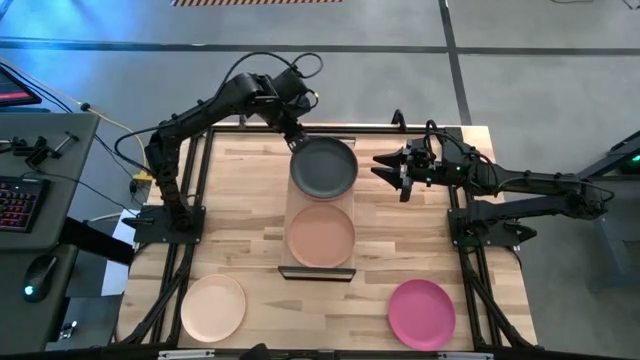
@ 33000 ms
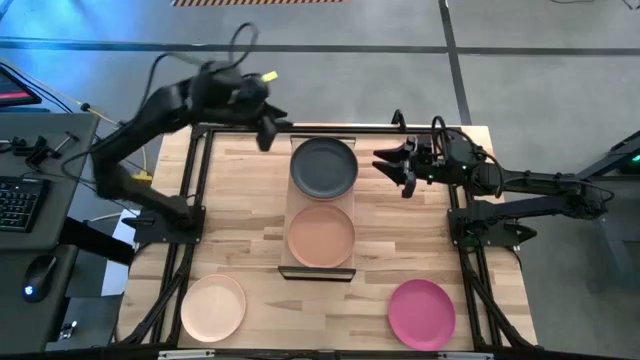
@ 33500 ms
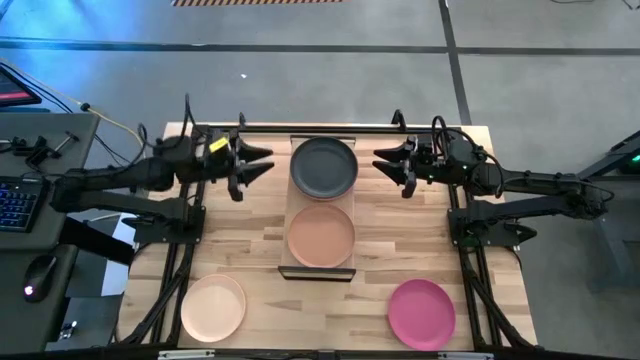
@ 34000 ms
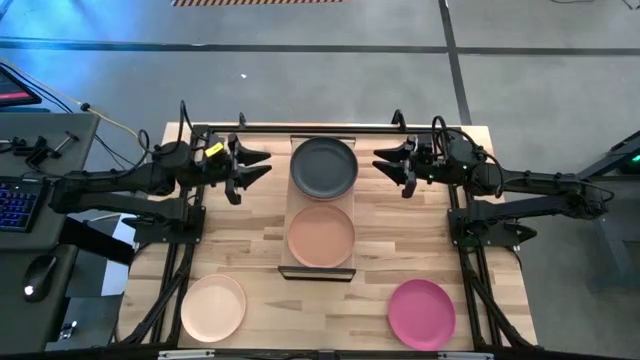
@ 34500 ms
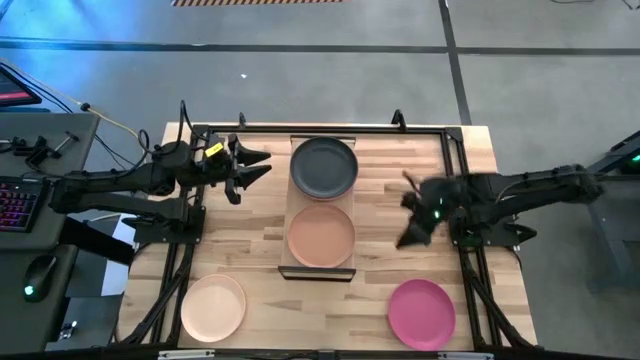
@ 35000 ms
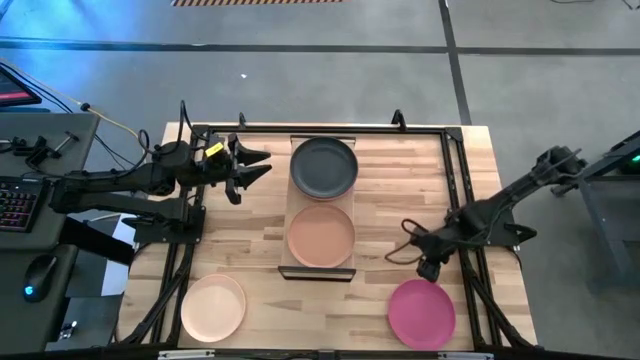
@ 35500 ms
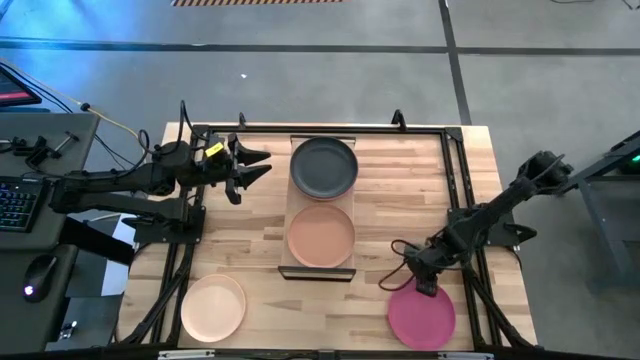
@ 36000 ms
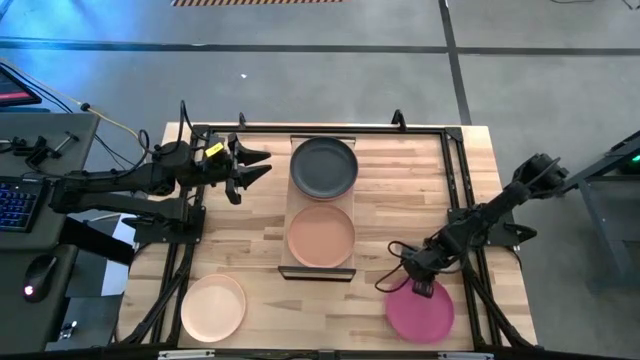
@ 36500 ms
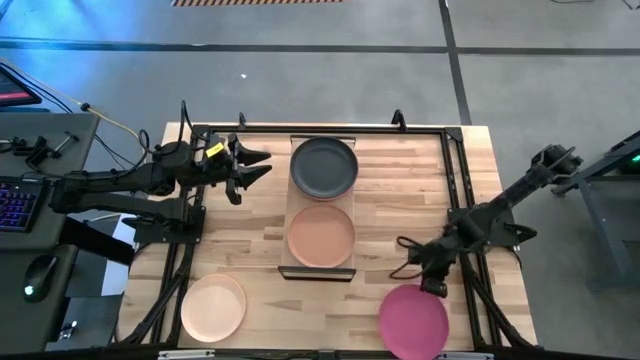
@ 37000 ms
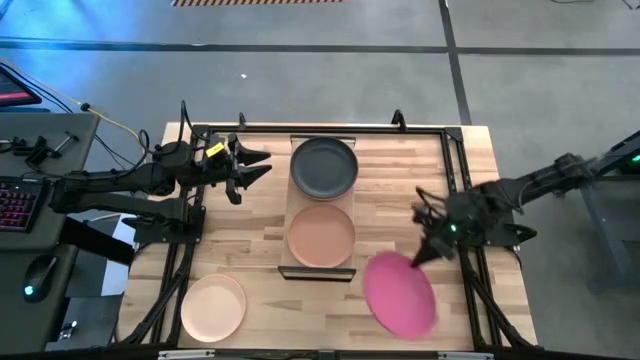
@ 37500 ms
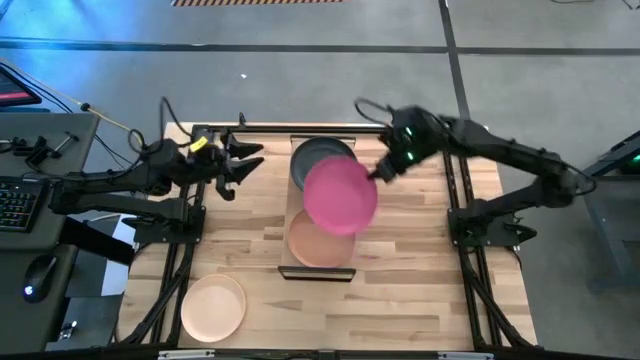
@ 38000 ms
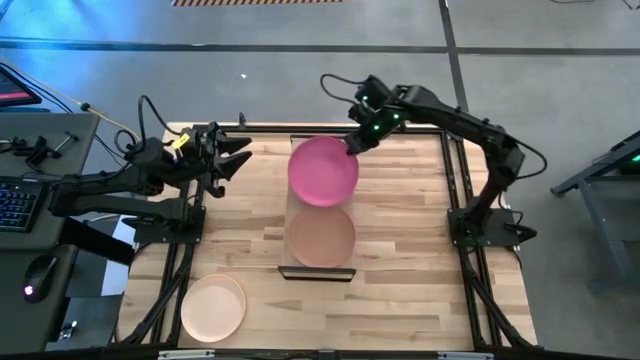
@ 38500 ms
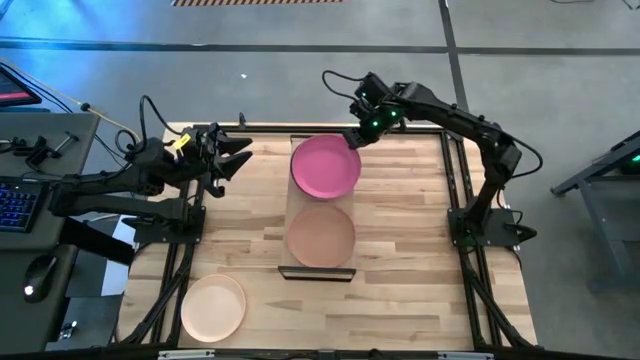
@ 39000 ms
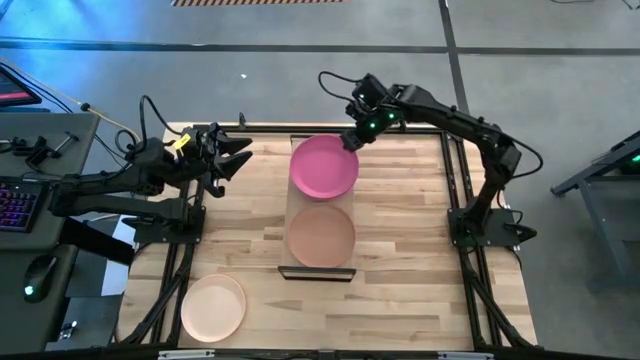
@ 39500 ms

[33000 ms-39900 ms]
Task: Place and stack plates onto a shelf
Stack the pink plate on top of the black plate on the shelf

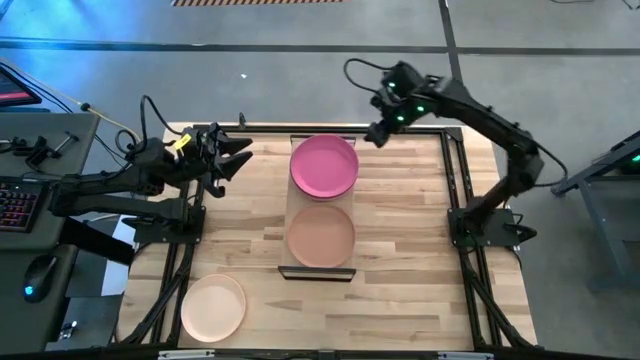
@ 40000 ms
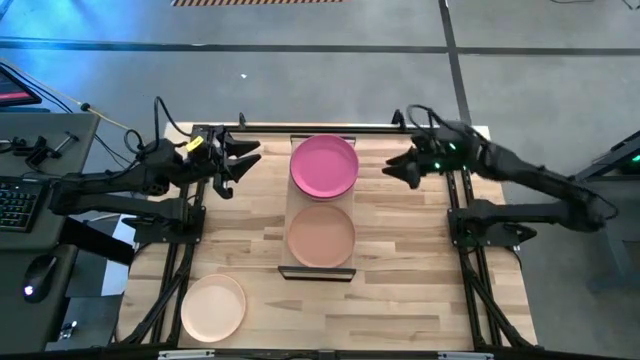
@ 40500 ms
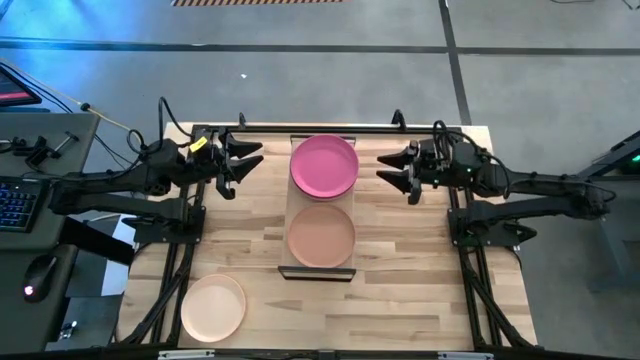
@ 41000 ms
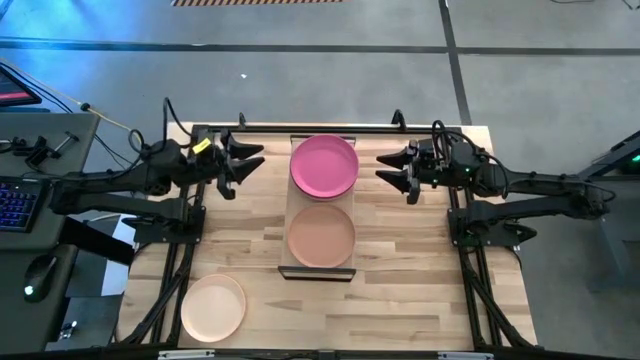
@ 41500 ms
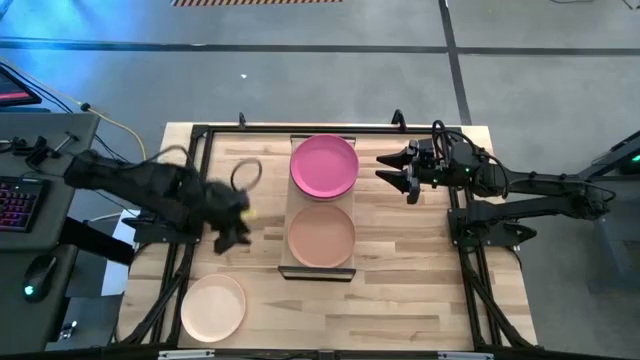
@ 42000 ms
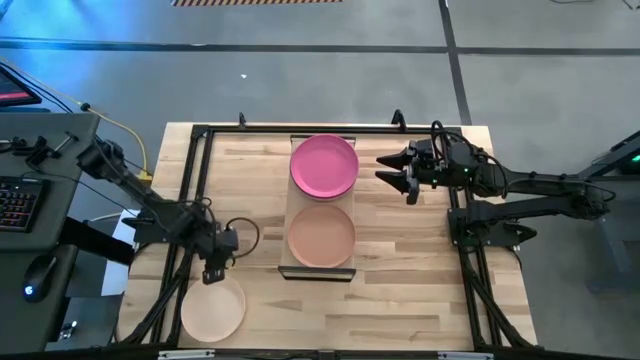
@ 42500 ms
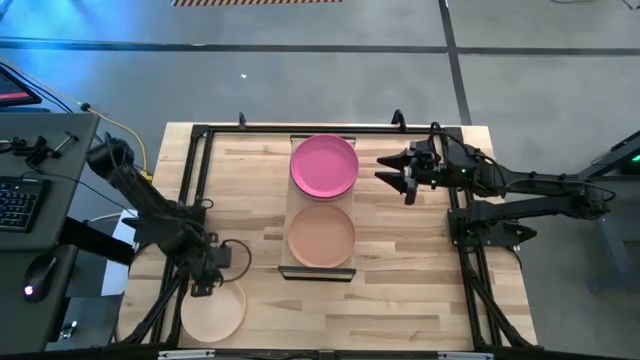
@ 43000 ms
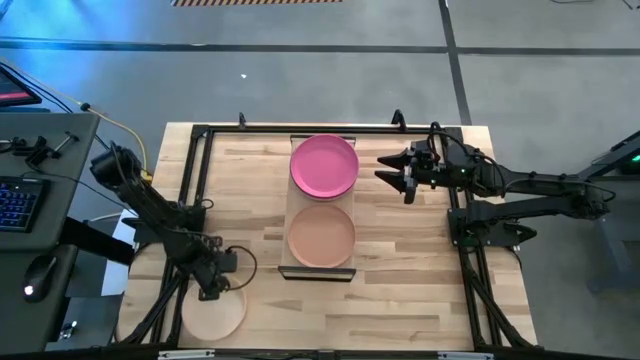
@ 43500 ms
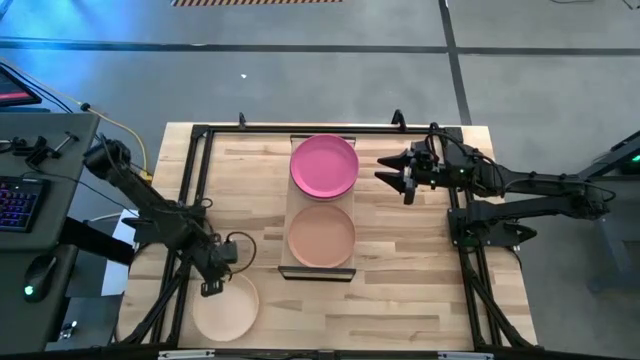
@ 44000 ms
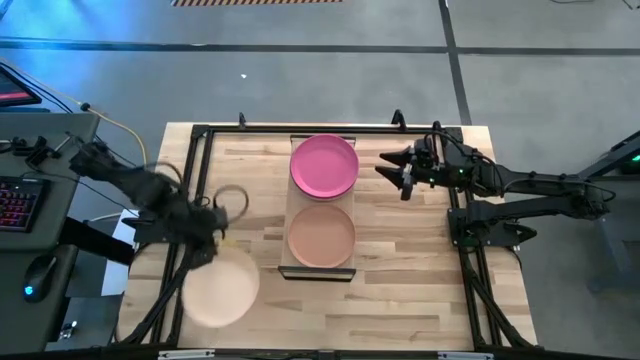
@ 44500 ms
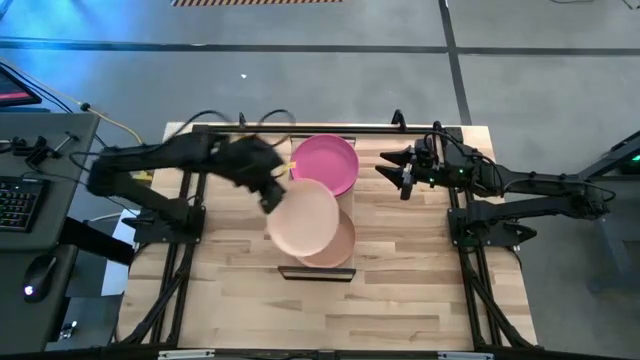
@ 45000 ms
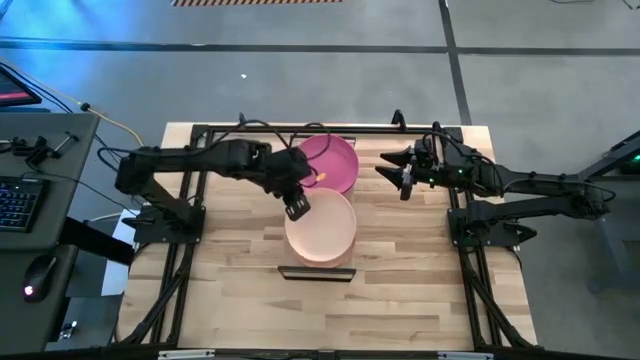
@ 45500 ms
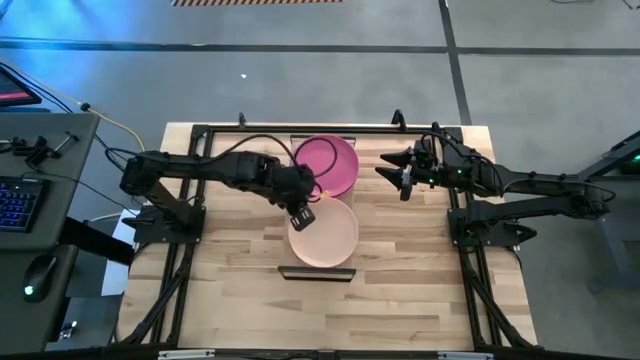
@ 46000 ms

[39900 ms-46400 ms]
Stack the light orange plate on top of the brown plate on the shelf

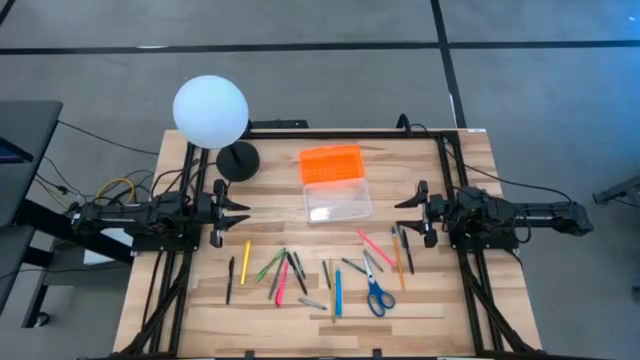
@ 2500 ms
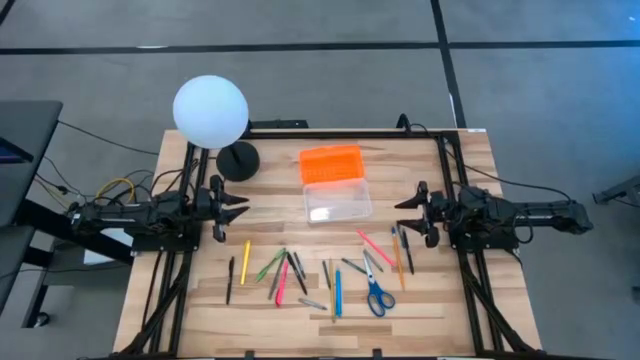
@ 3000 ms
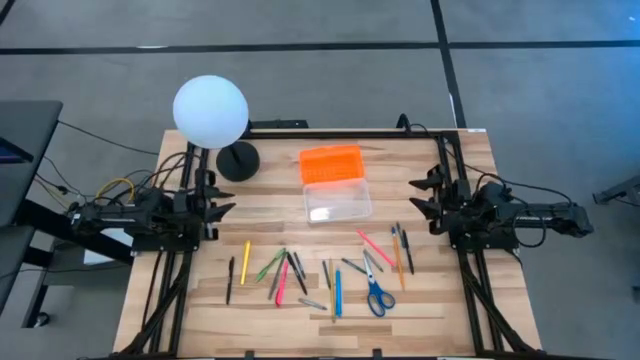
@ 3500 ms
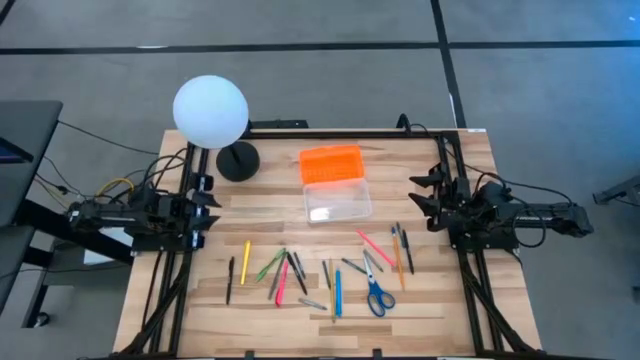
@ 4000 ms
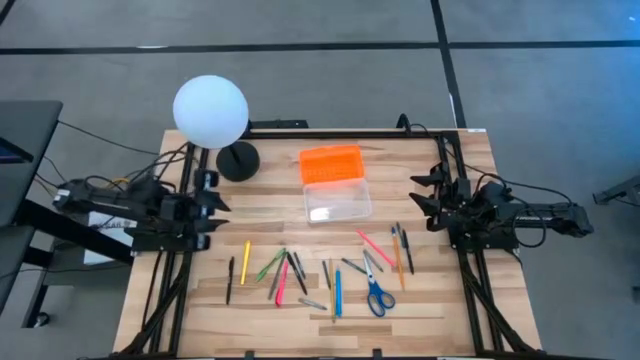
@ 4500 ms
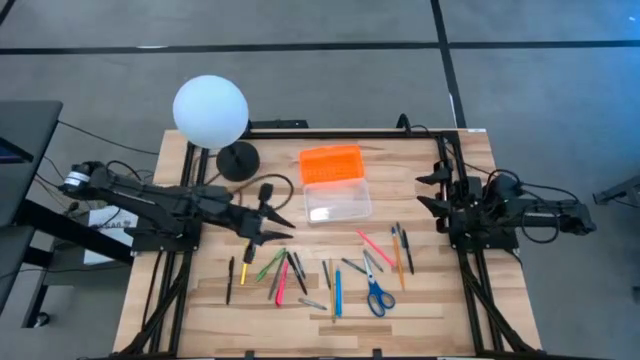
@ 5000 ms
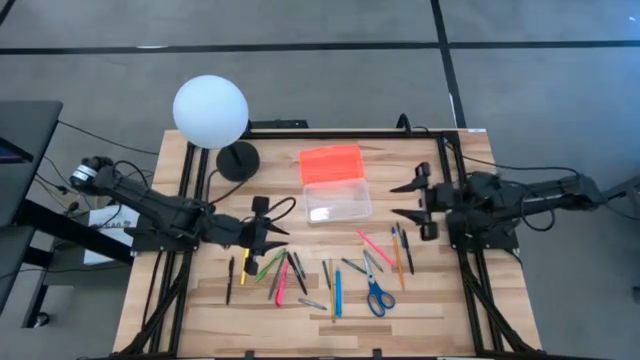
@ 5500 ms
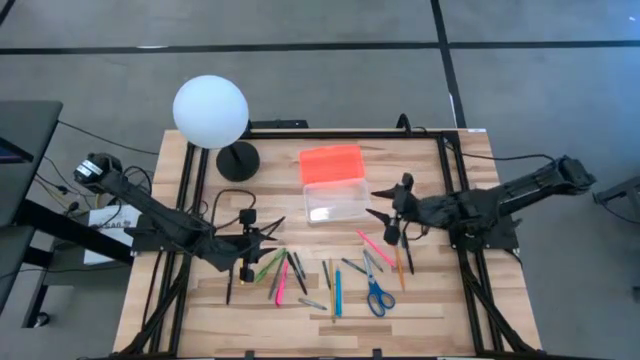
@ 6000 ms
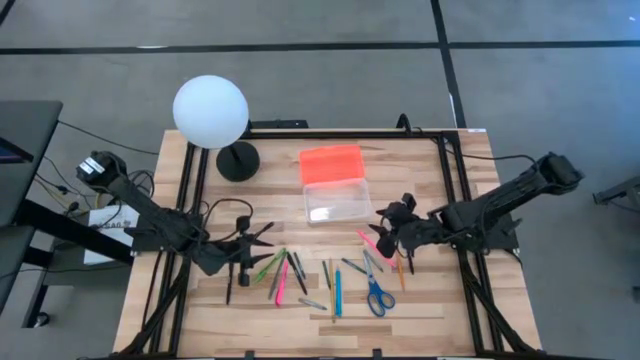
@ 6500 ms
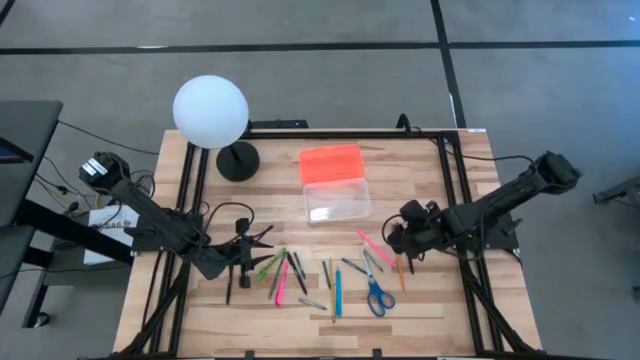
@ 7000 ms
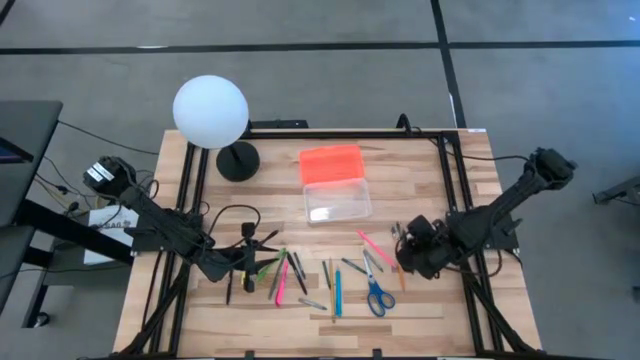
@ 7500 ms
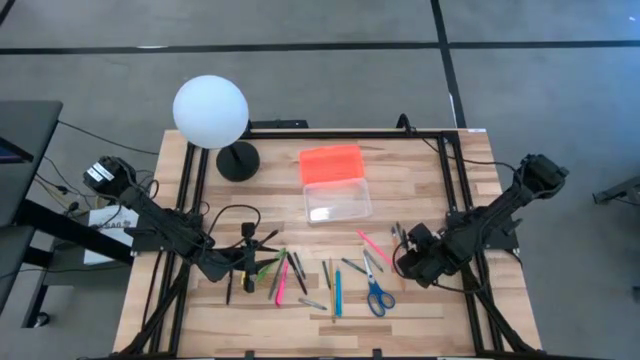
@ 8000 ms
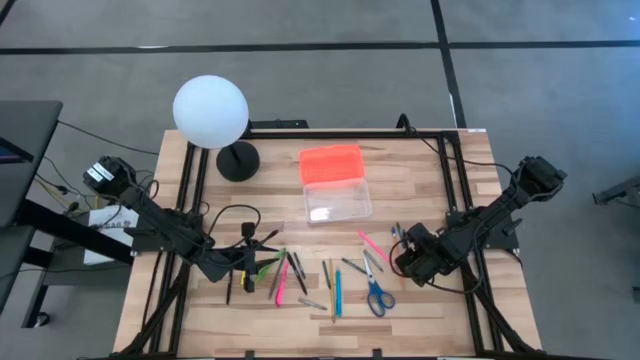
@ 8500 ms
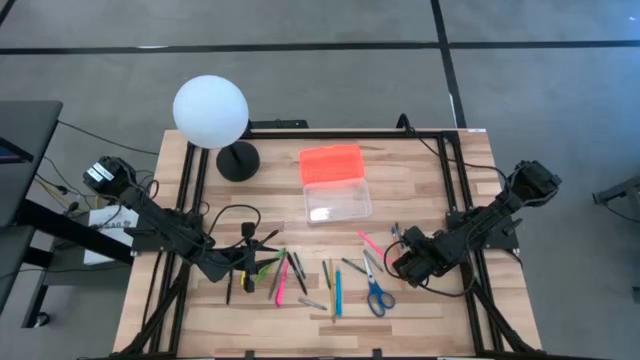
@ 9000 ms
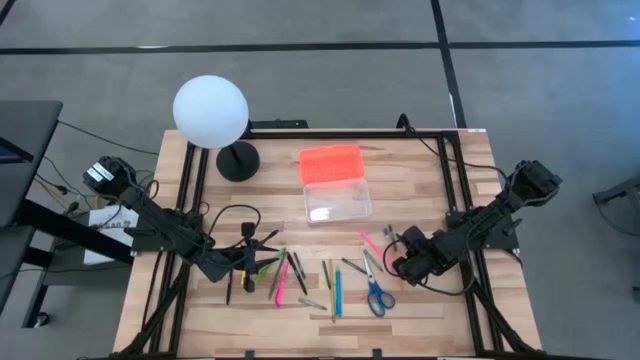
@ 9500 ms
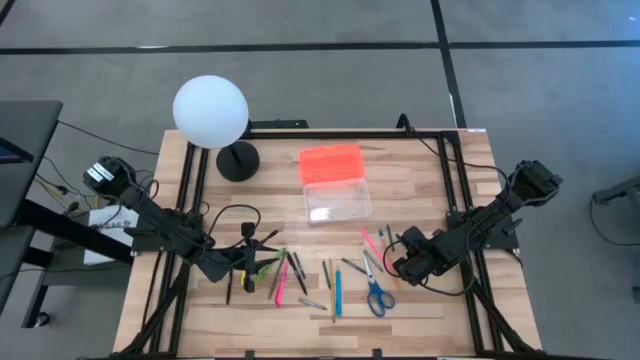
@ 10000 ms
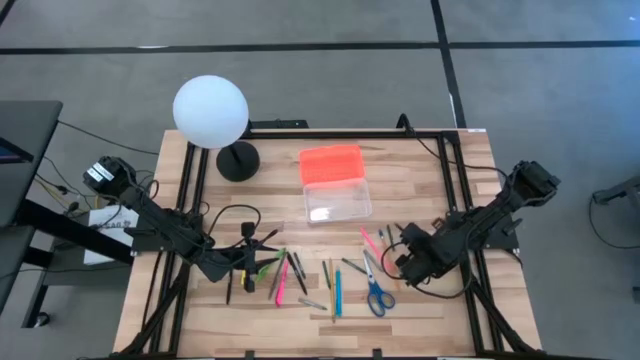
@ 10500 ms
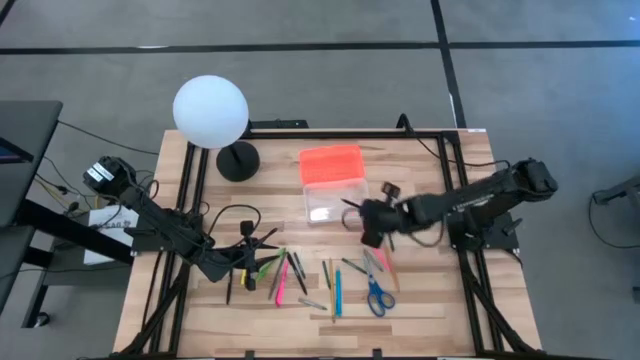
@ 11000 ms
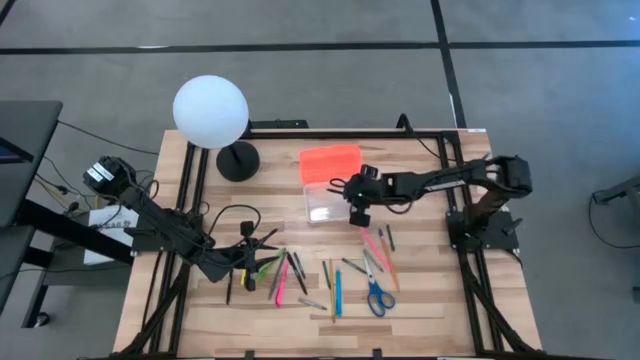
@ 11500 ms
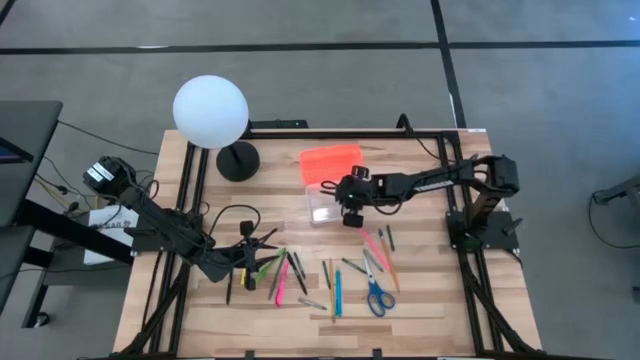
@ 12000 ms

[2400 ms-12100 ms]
Task: Pick & place school supplies into a supply box
Put the black pen into the orange supply box
